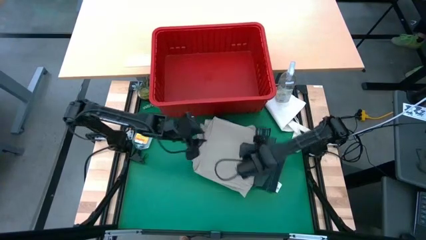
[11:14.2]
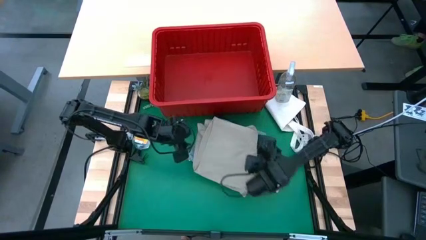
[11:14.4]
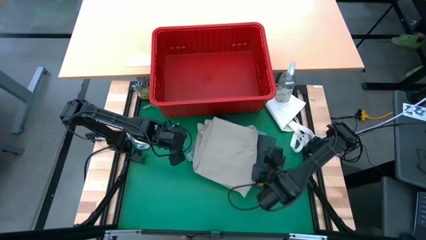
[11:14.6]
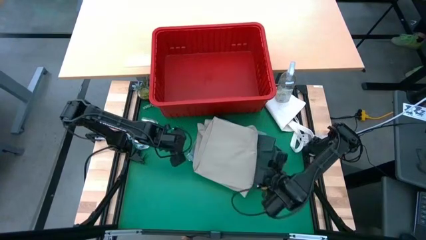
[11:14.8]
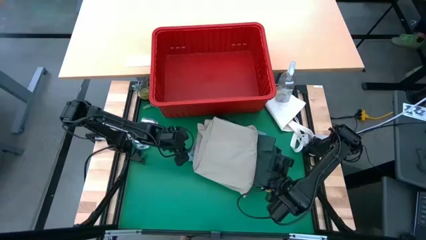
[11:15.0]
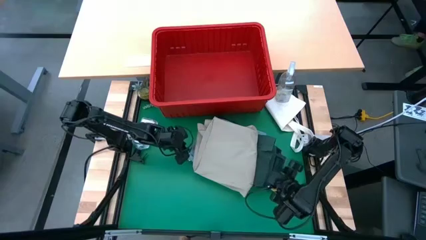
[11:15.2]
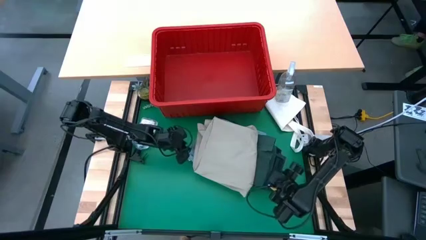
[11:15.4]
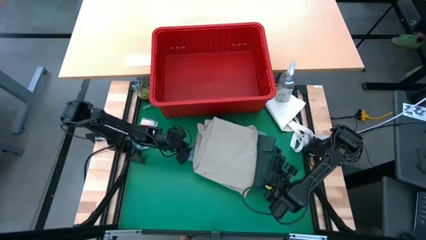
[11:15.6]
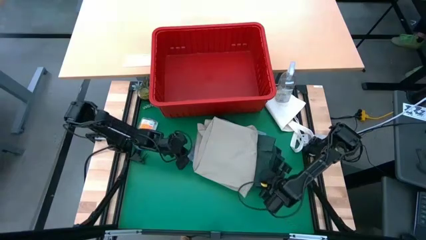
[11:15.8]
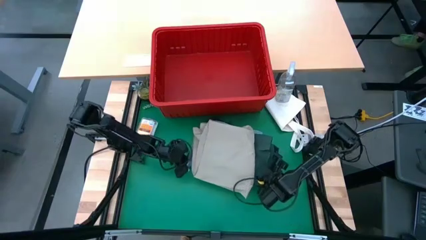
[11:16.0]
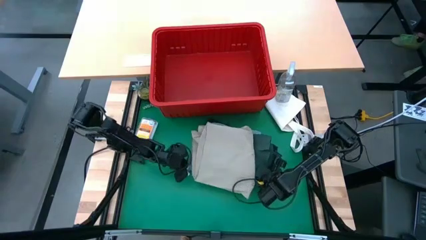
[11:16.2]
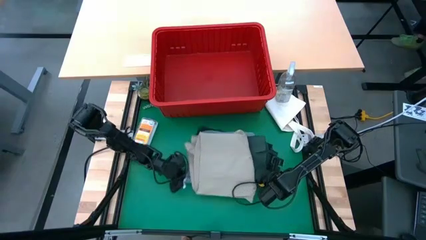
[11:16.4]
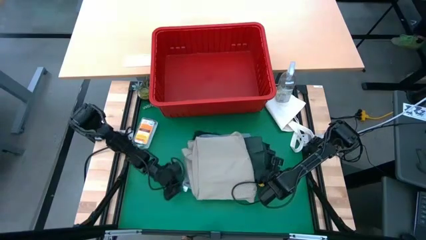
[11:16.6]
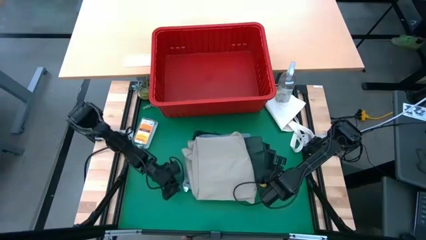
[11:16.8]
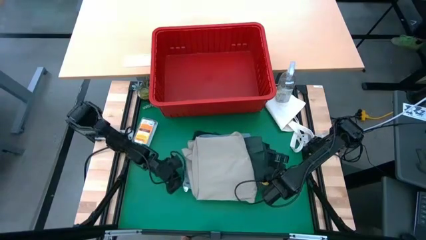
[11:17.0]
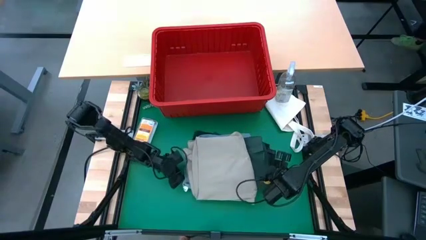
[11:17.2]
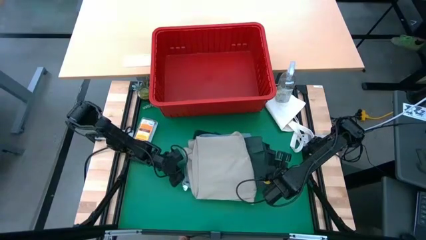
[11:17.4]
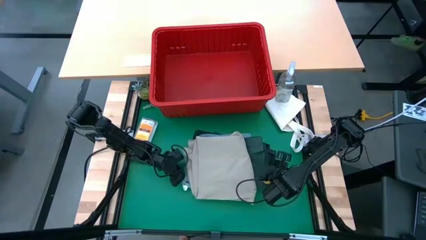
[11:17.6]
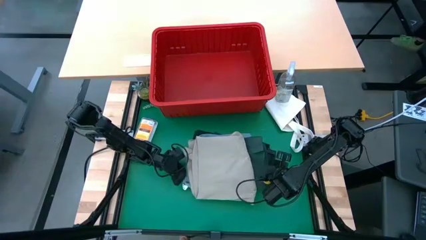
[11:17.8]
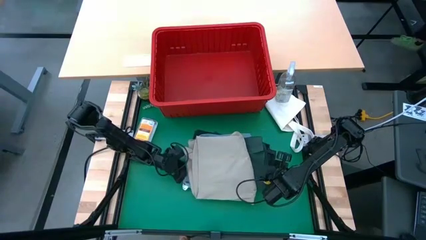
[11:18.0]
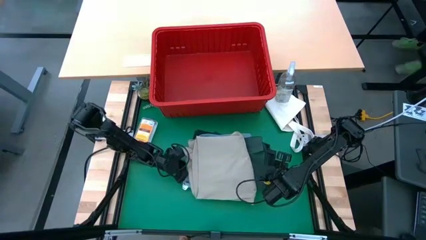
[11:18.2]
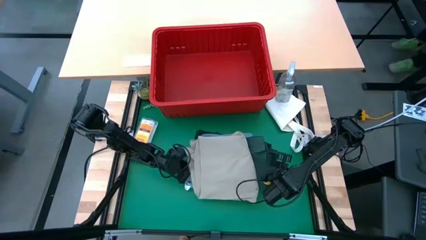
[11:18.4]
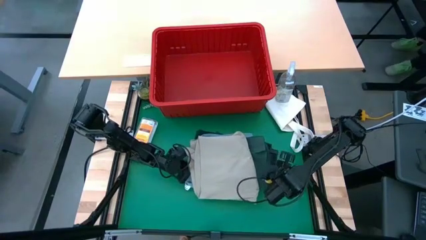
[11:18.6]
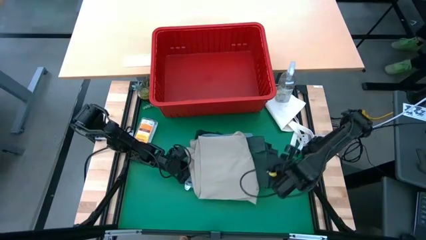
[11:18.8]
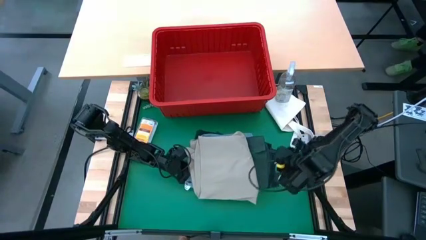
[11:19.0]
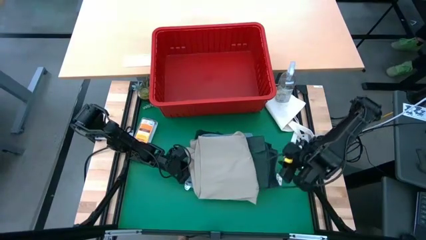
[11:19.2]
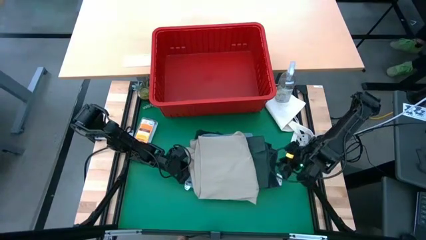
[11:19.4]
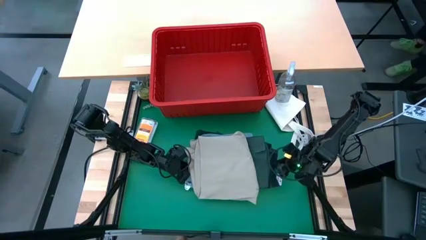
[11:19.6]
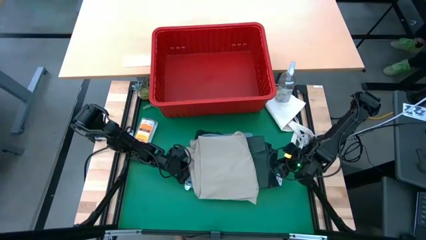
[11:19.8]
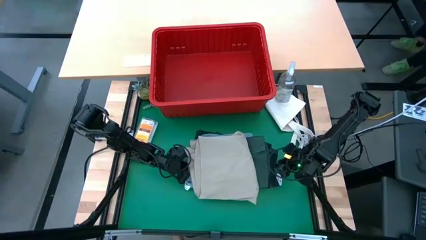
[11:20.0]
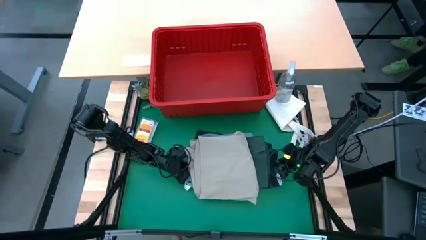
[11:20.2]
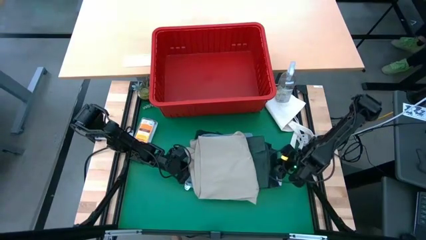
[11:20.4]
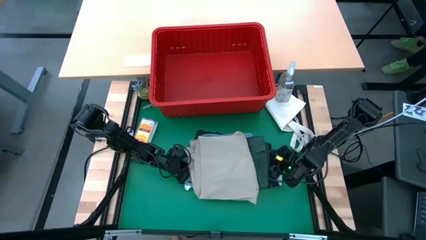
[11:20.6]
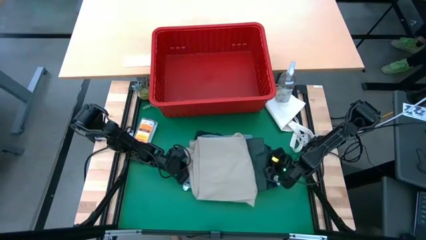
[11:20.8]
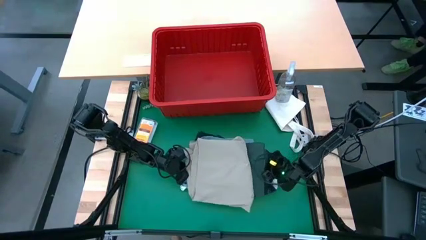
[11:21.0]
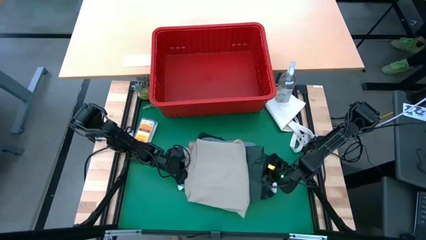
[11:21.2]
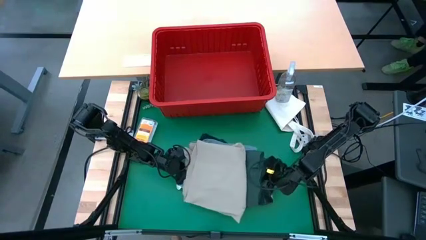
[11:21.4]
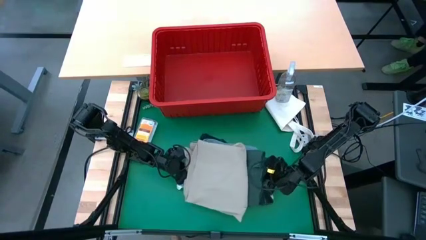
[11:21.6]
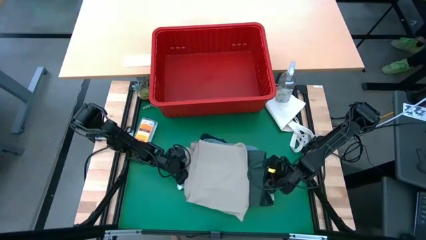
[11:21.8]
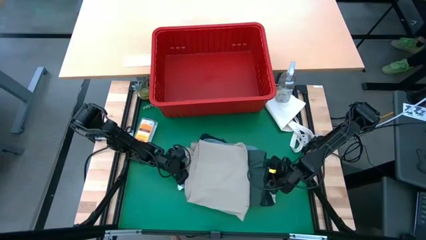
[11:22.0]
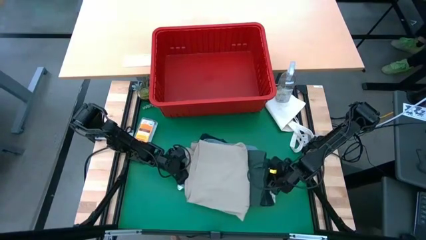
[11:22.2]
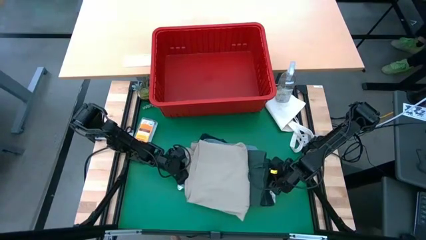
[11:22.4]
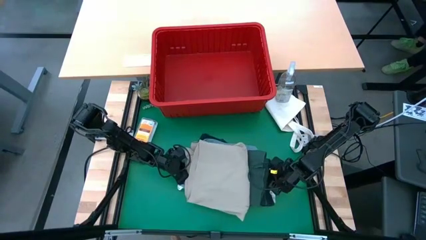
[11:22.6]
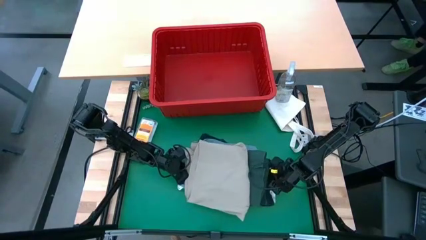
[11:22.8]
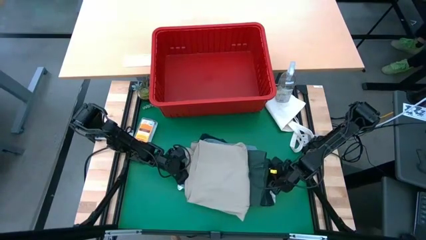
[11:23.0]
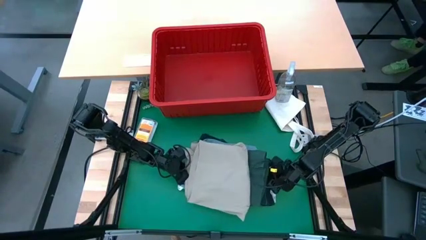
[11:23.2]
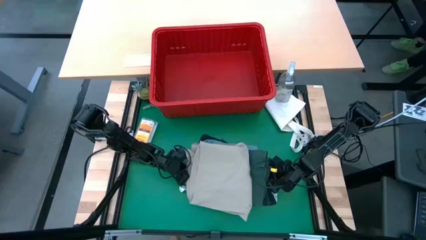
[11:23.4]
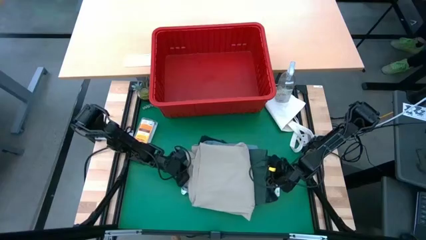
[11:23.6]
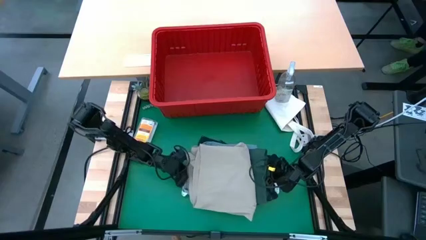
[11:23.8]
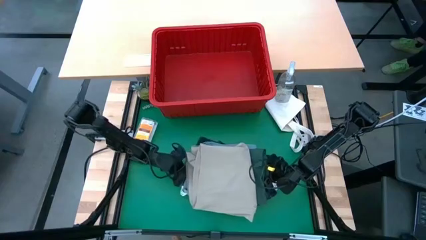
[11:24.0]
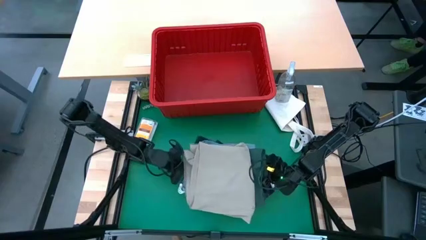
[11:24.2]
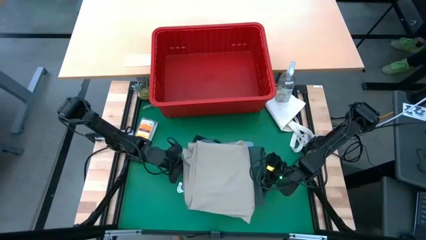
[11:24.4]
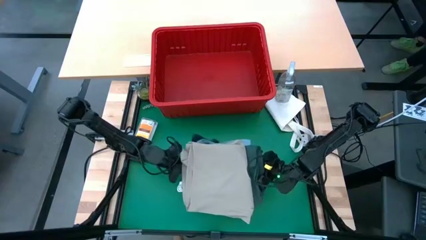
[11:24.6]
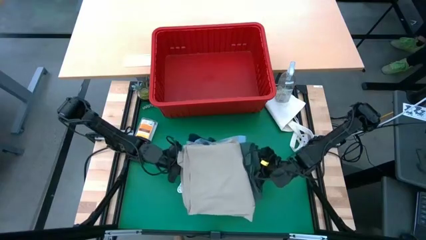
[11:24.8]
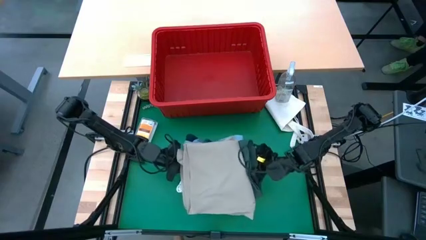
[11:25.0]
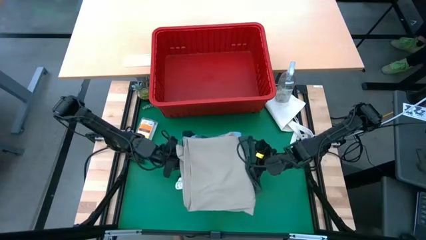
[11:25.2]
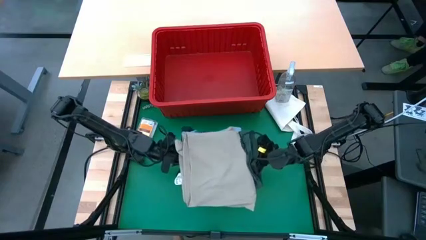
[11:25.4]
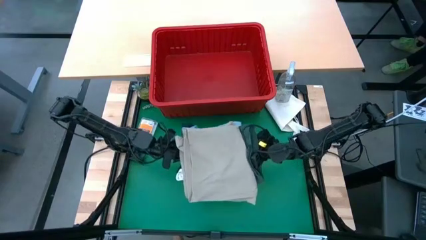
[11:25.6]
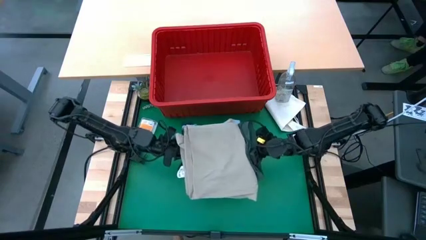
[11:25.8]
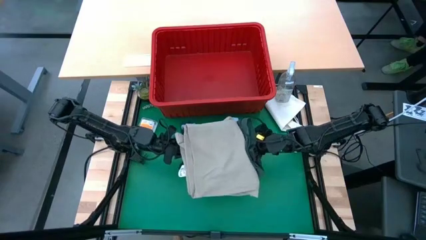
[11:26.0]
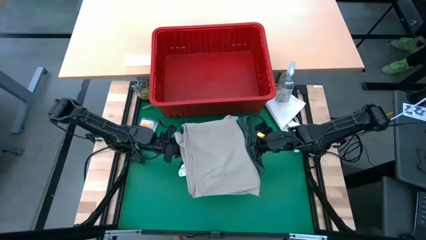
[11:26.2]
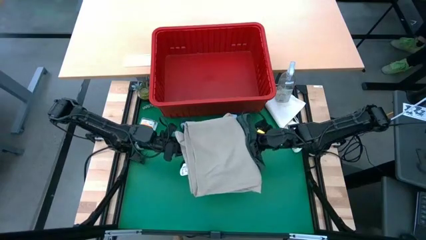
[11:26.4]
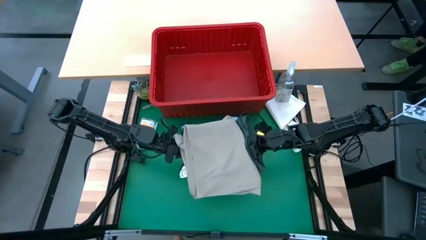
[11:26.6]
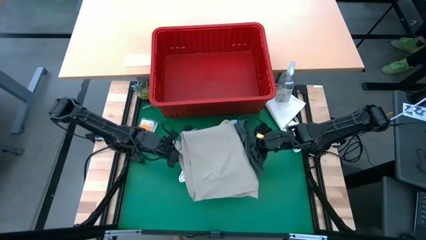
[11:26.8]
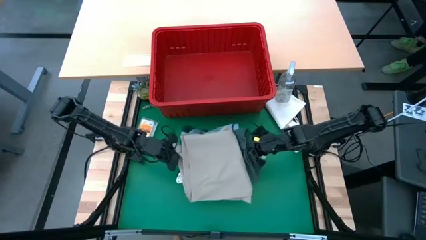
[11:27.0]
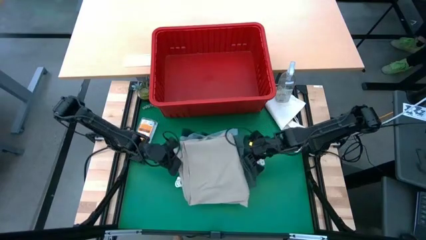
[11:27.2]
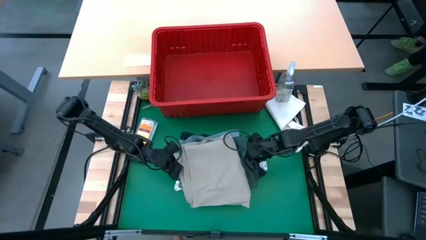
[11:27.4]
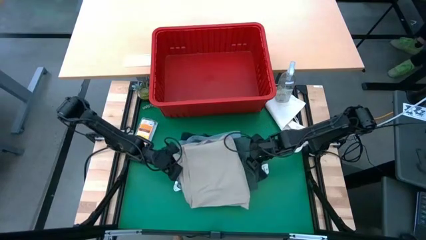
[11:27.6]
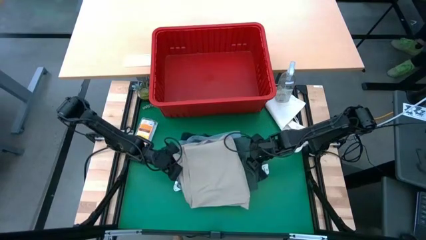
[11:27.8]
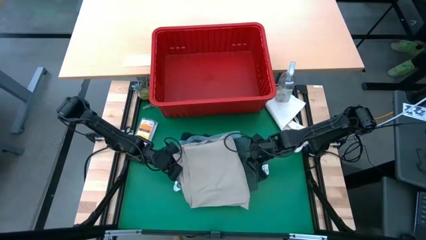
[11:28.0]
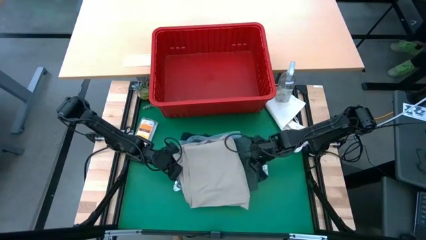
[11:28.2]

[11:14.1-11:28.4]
Task: Fold laundry
Put the stack of colored folded clothes into the red laundry bin

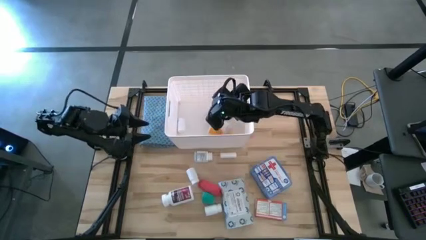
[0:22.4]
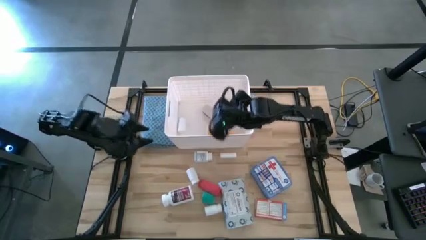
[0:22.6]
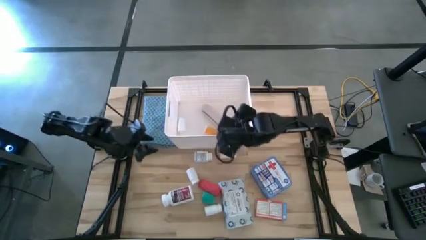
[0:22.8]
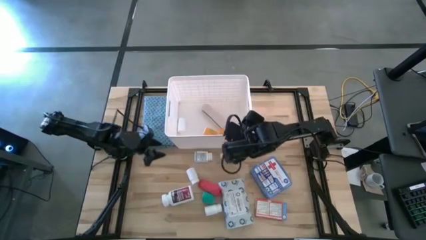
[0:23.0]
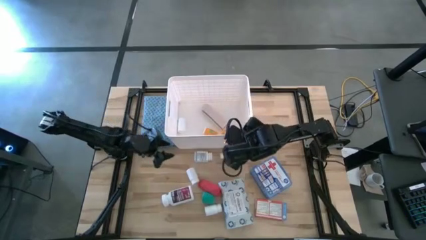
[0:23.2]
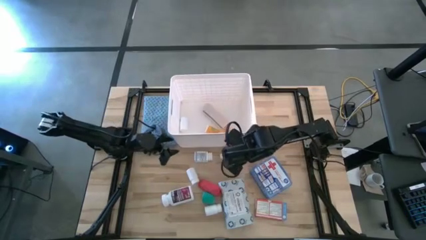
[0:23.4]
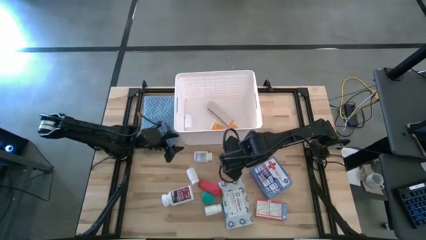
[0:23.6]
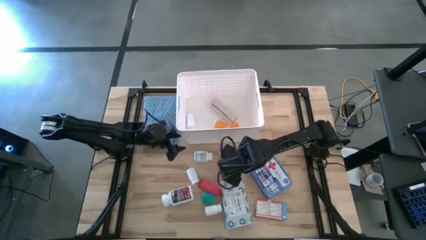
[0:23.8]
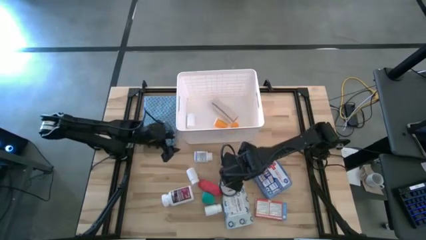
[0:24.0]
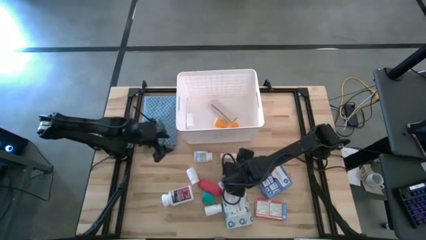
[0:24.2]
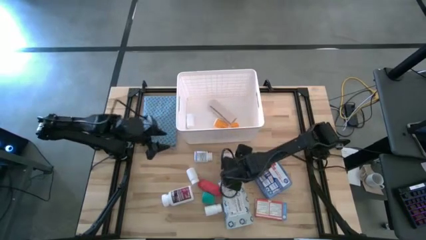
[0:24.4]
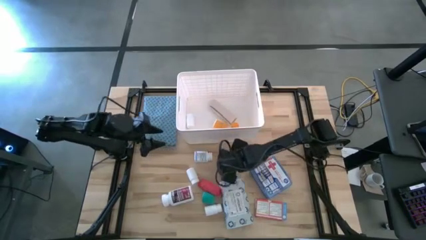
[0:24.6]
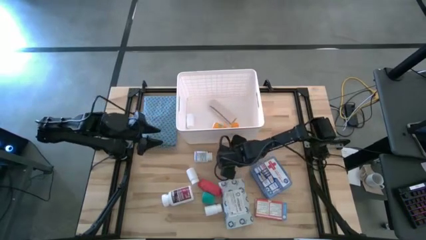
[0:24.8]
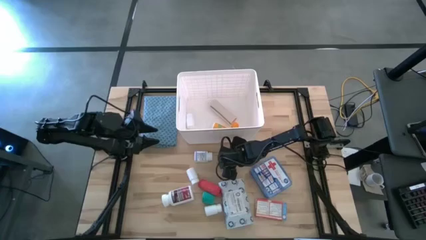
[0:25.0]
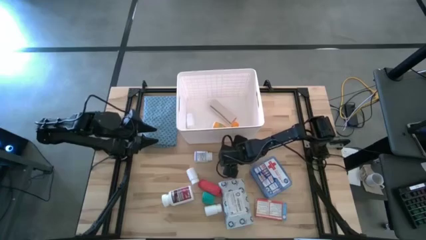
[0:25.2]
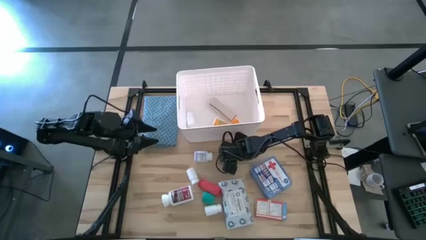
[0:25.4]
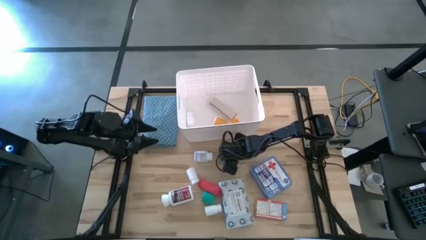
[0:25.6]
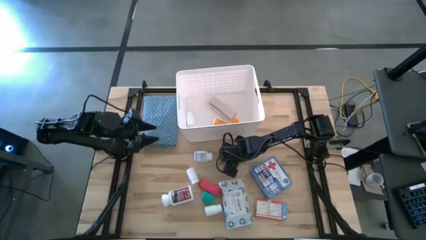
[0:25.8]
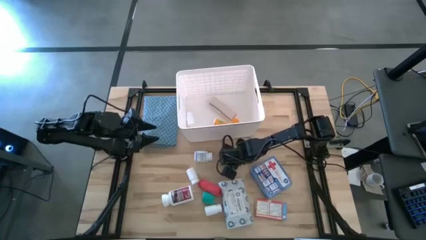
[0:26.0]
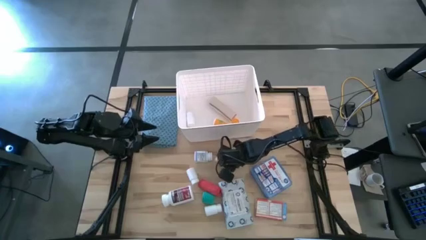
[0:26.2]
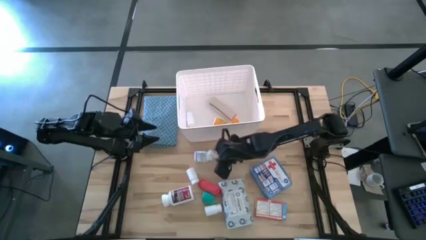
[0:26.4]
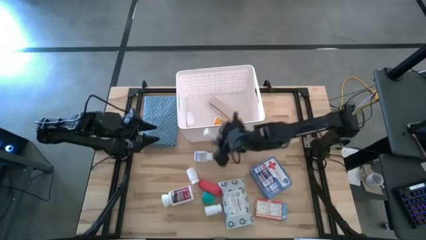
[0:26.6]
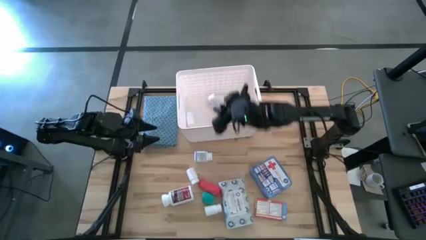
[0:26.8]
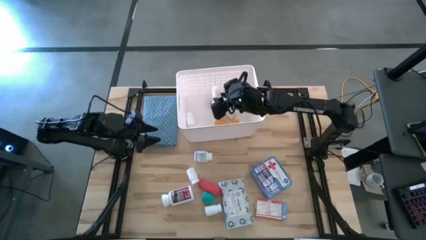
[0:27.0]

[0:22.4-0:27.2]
Task: Pick & place medical supplies in basket/bin
Put the rolled white gauze into the white container
